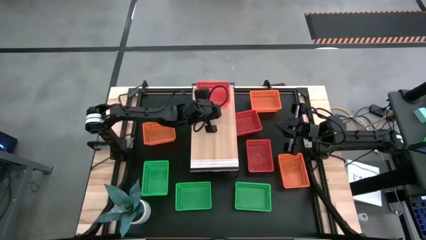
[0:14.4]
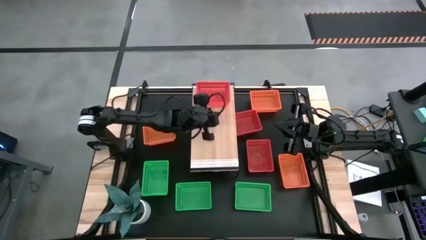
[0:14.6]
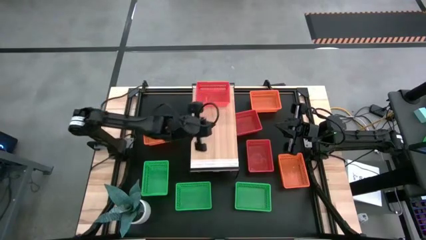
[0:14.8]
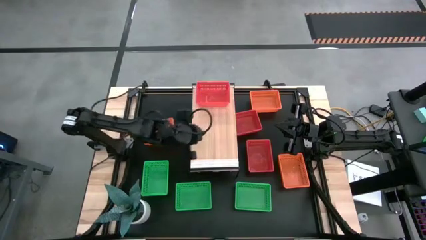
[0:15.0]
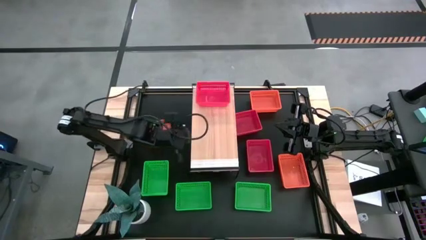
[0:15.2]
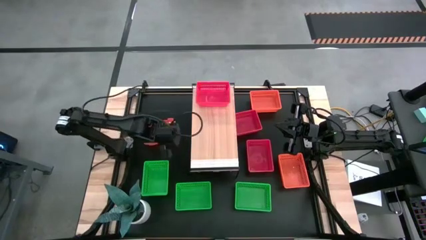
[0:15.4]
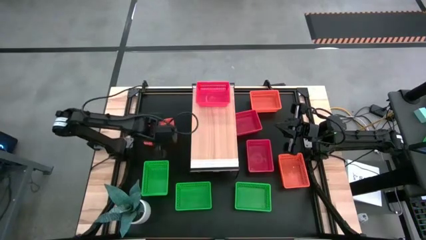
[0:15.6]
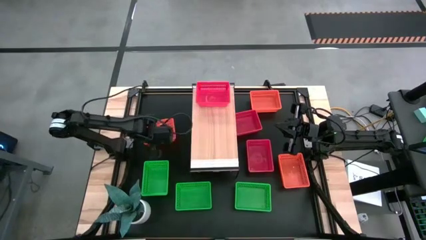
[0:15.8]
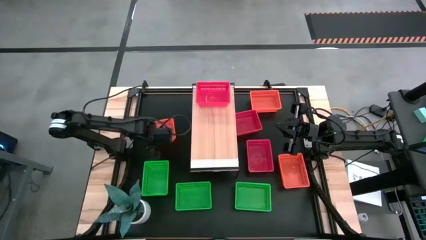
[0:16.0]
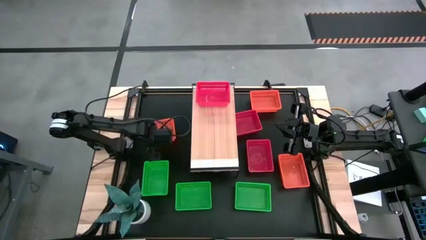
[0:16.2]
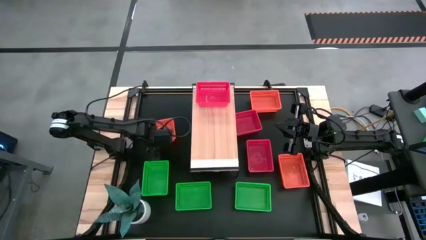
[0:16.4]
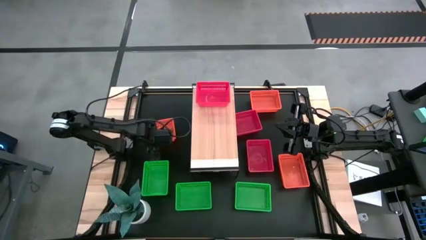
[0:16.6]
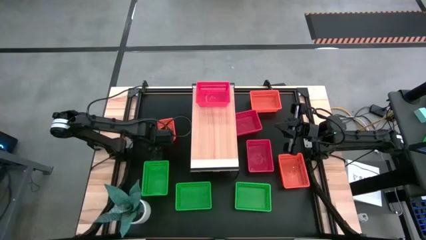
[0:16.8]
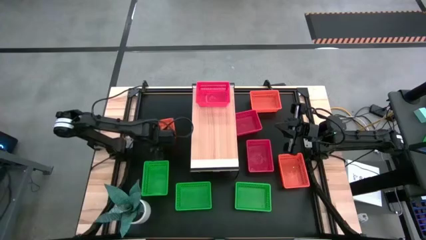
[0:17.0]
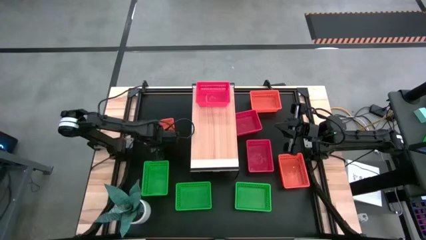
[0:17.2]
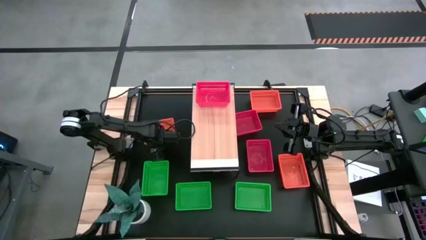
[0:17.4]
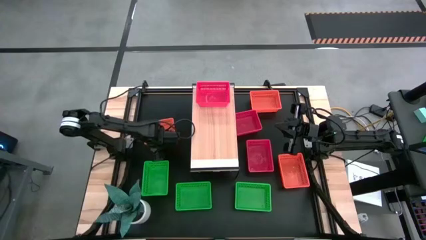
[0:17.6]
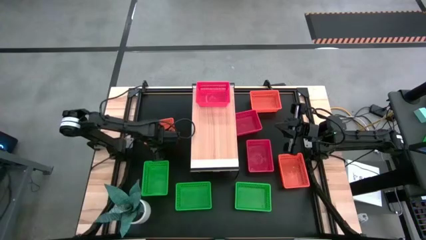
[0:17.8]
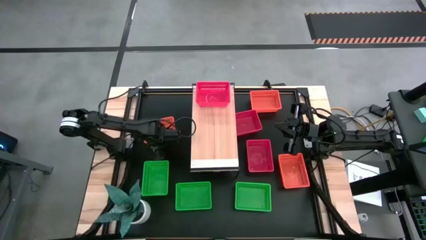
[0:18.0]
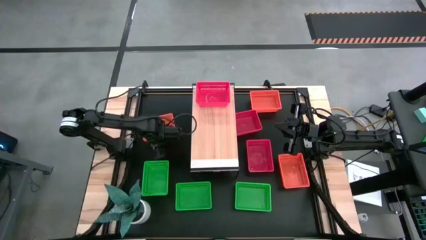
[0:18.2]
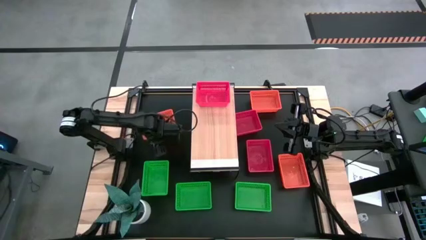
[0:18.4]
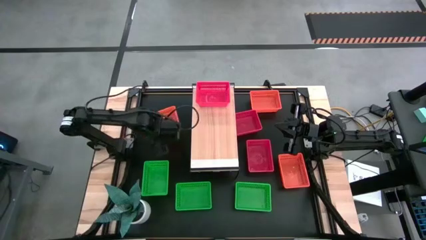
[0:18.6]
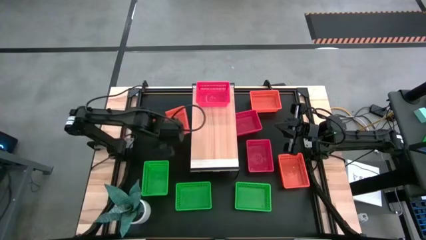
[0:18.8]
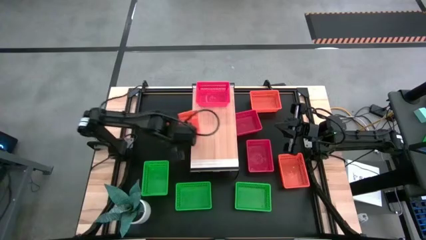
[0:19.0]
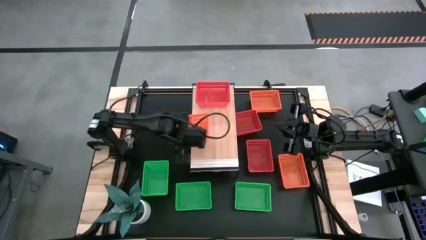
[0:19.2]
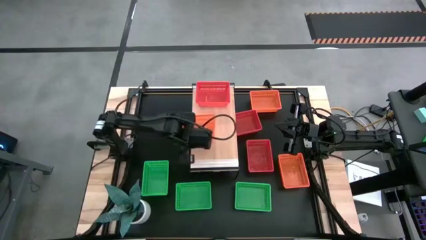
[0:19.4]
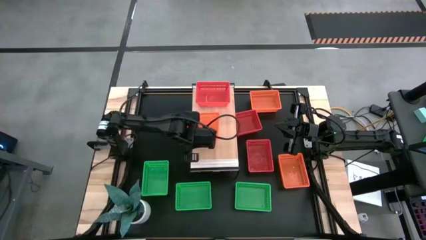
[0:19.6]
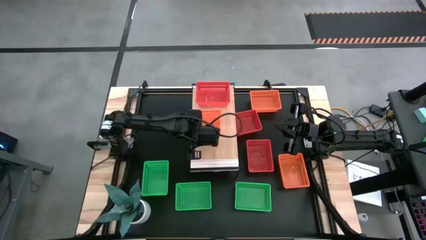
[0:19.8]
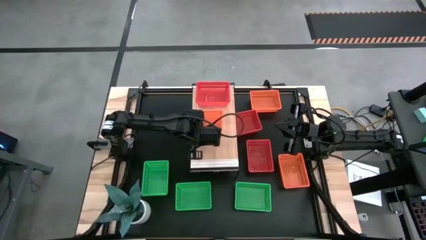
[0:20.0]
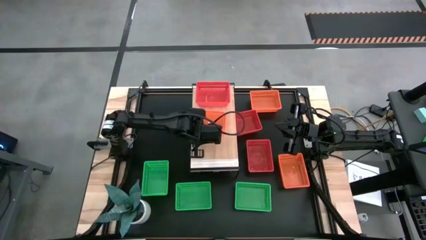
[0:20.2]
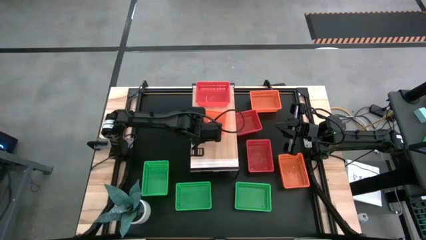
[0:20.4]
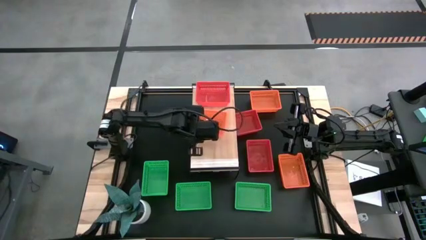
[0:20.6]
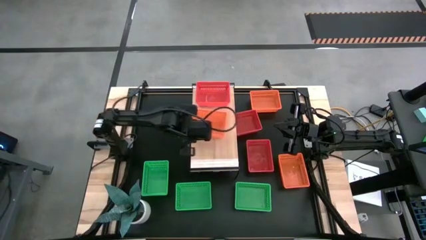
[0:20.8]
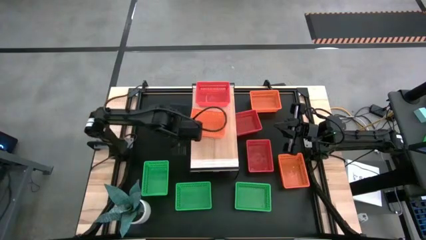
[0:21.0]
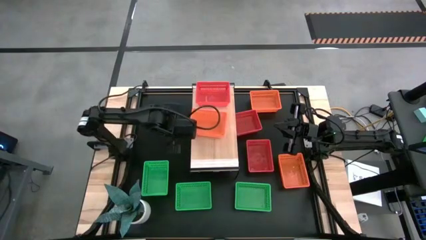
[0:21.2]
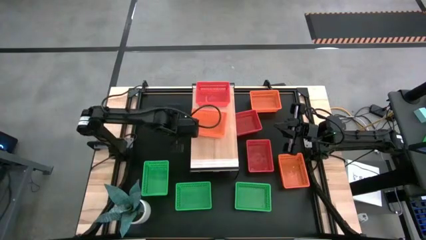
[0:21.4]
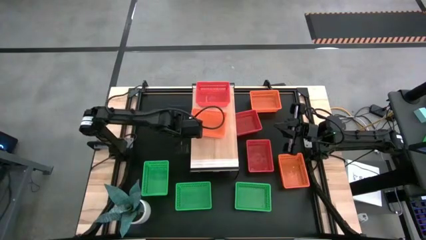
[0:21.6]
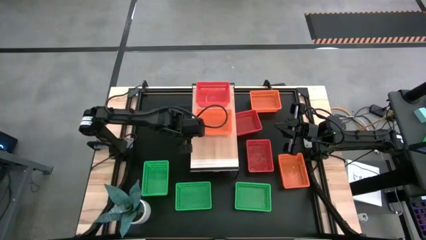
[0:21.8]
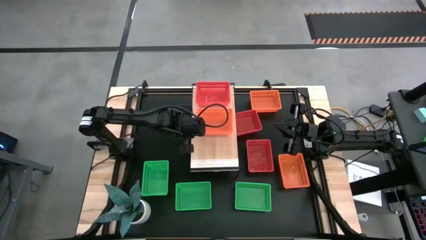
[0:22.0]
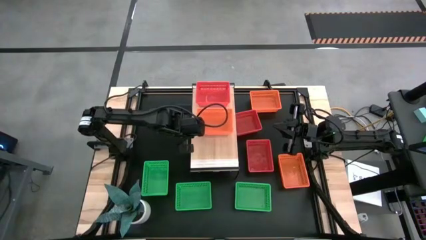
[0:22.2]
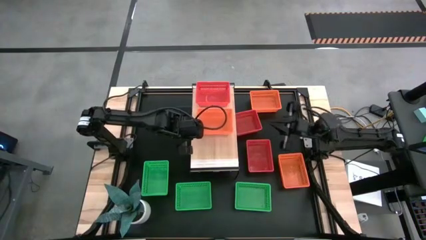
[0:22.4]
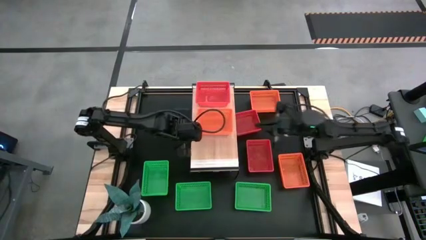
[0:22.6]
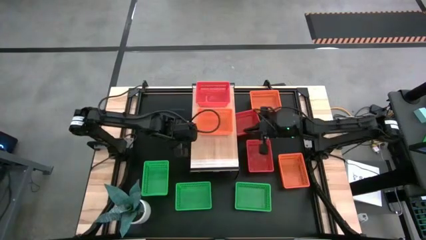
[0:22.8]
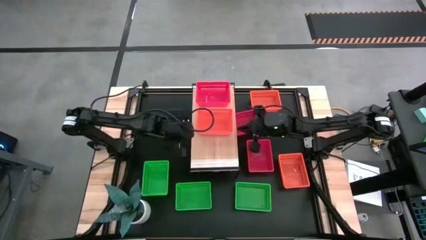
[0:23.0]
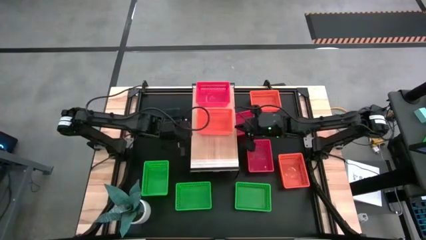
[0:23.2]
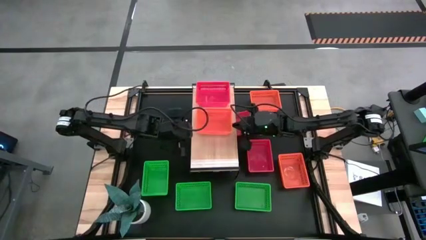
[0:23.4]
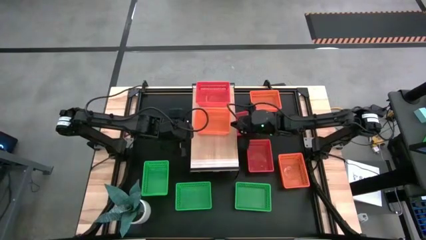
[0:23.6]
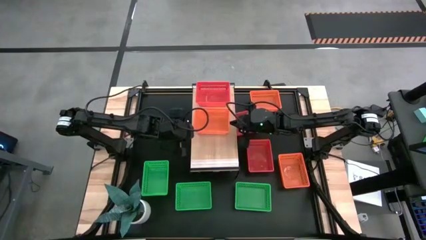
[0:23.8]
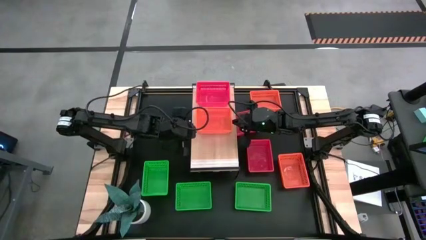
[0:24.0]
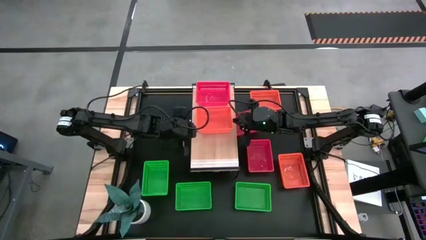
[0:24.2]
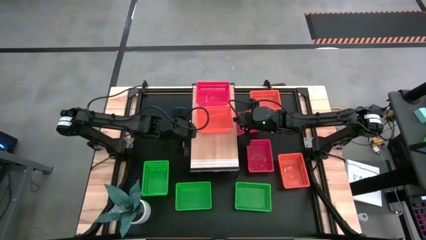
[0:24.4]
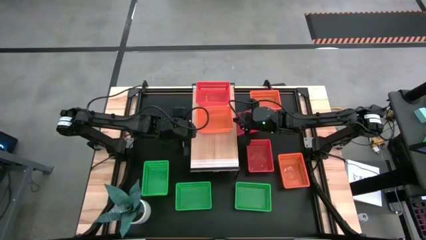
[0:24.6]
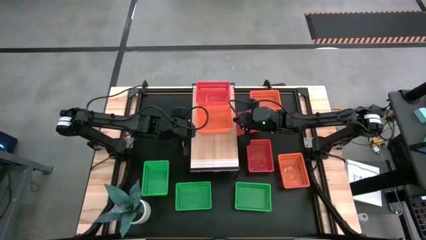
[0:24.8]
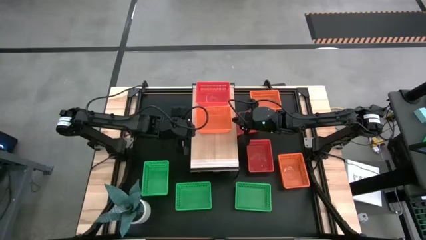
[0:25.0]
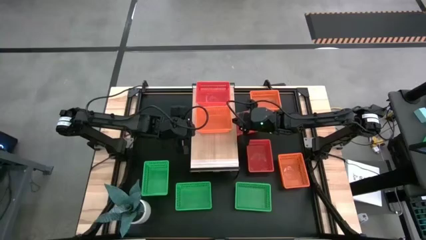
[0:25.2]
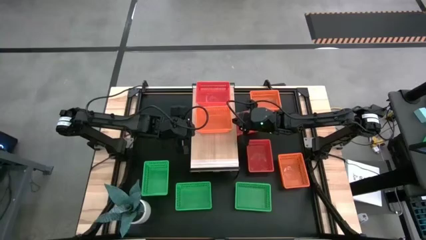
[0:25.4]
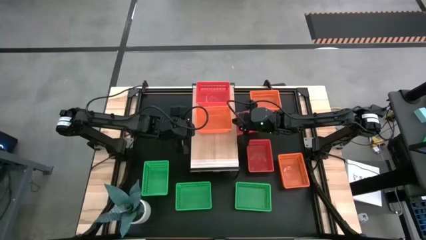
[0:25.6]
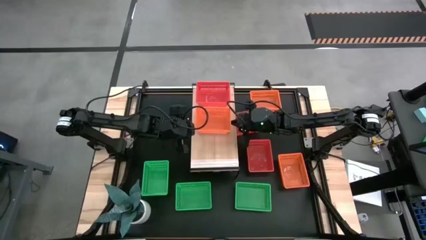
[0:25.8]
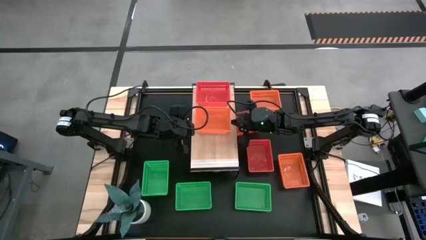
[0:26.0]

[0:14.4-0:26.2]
Task: Stack baskets on shelf by color
Put the middle orange bin on the shelf
